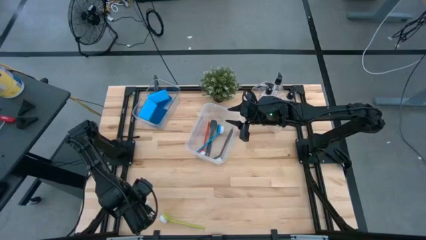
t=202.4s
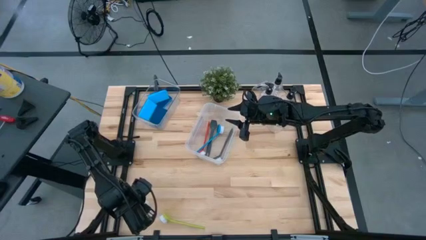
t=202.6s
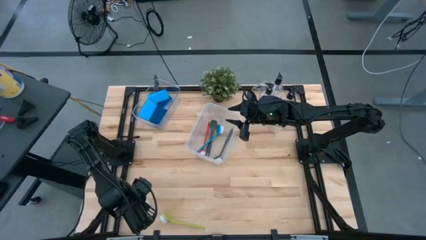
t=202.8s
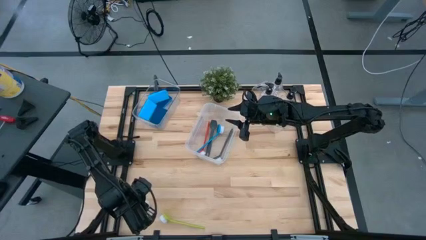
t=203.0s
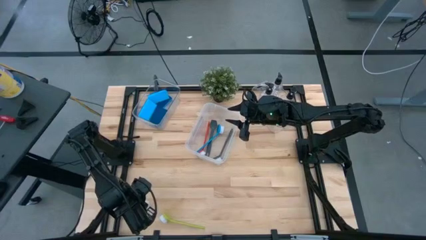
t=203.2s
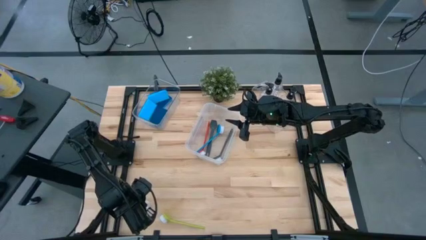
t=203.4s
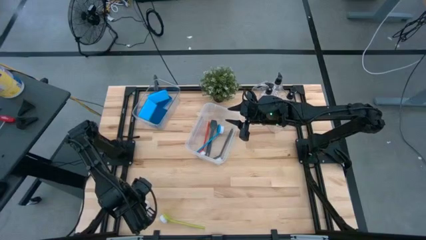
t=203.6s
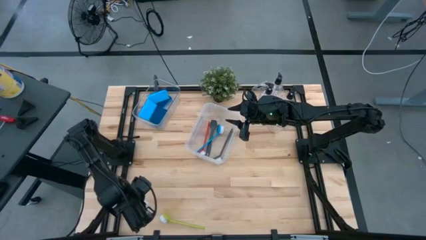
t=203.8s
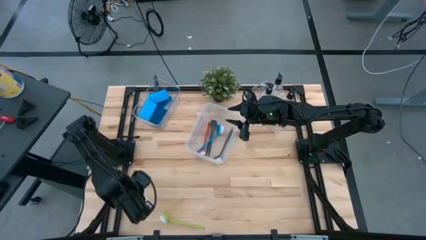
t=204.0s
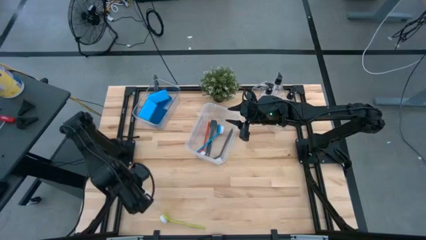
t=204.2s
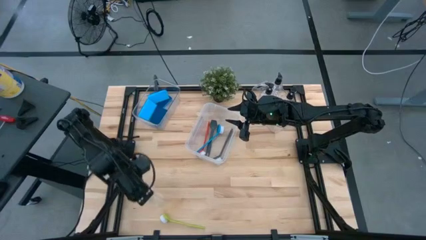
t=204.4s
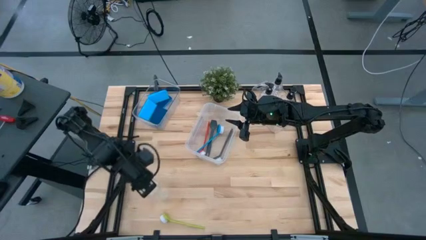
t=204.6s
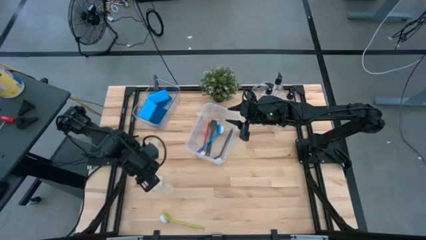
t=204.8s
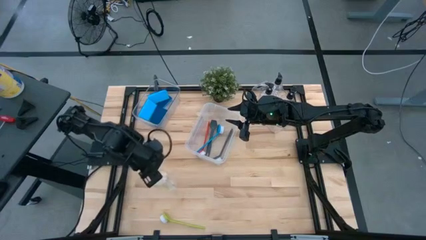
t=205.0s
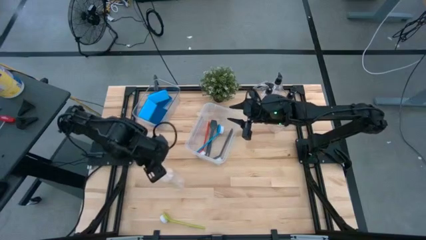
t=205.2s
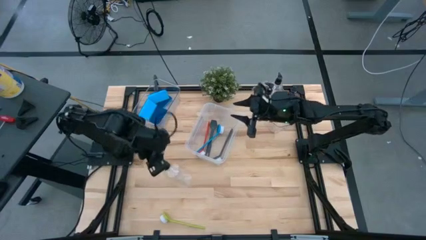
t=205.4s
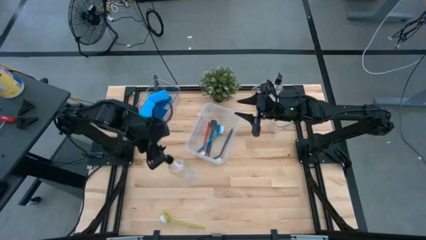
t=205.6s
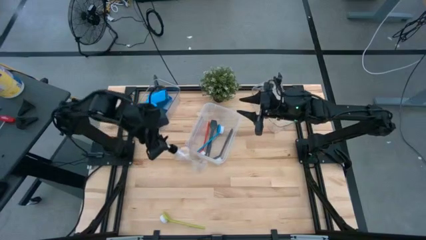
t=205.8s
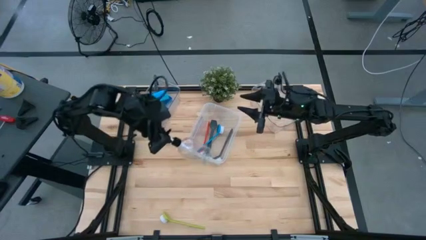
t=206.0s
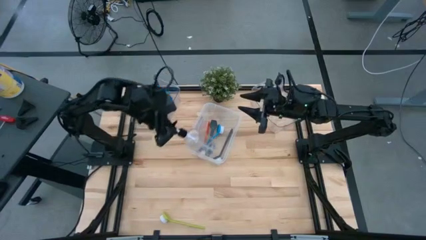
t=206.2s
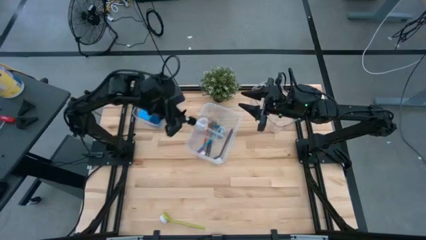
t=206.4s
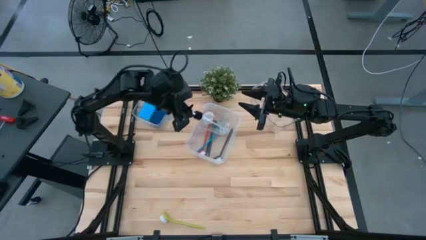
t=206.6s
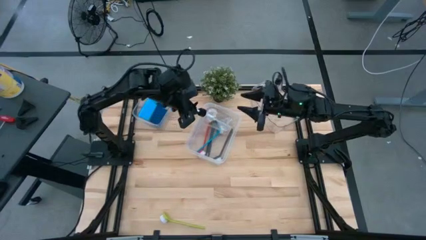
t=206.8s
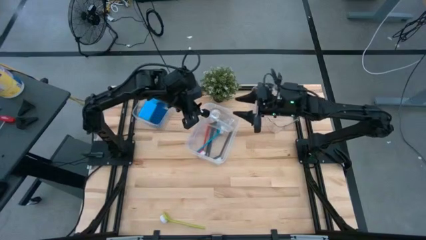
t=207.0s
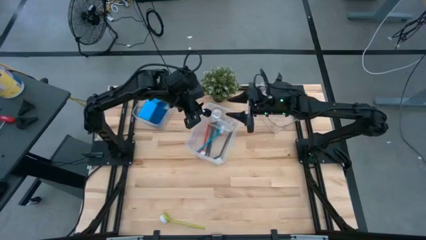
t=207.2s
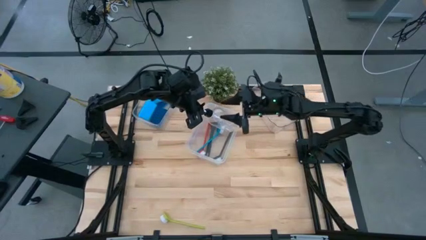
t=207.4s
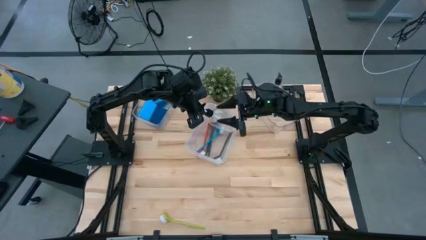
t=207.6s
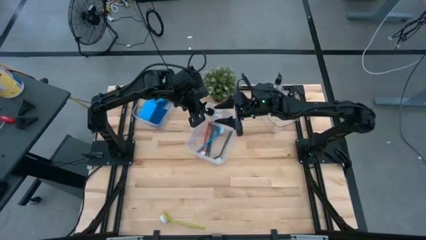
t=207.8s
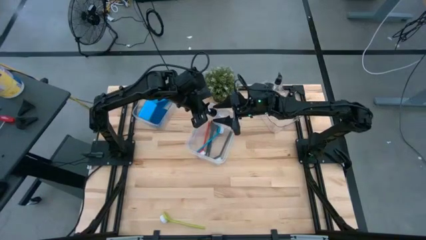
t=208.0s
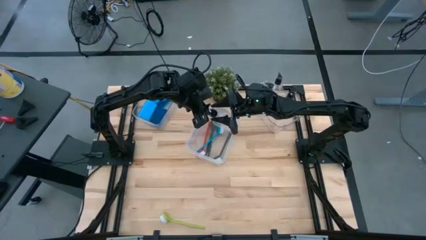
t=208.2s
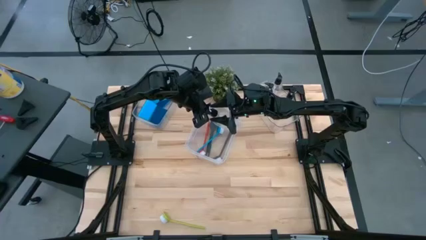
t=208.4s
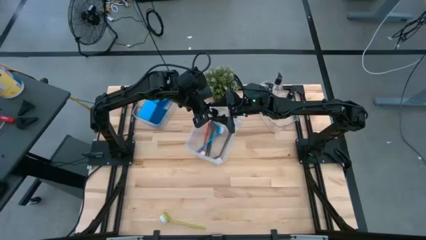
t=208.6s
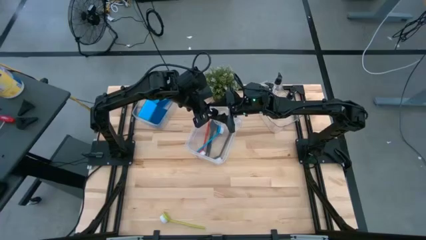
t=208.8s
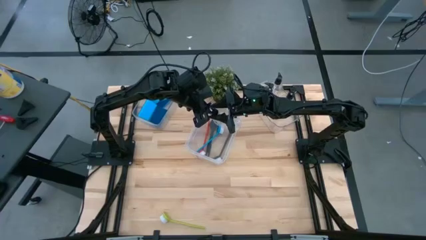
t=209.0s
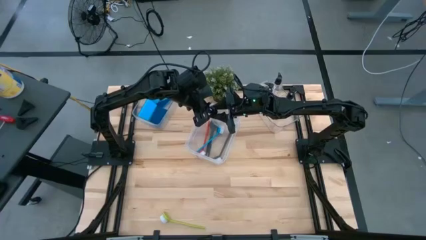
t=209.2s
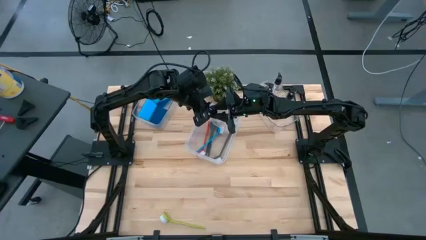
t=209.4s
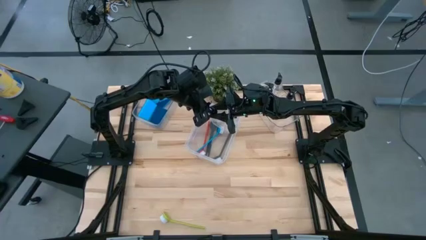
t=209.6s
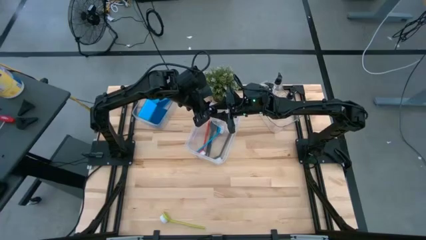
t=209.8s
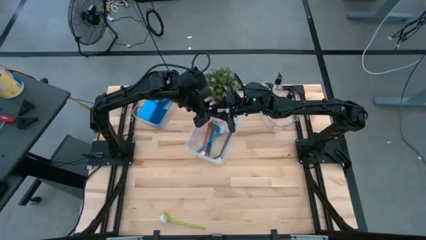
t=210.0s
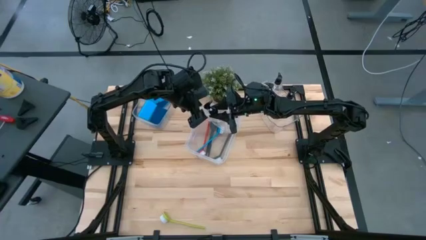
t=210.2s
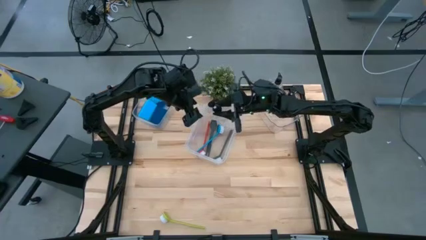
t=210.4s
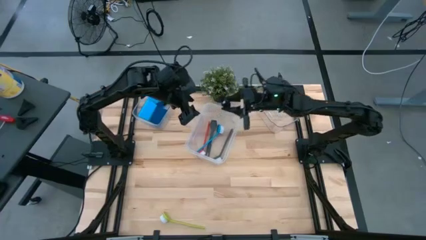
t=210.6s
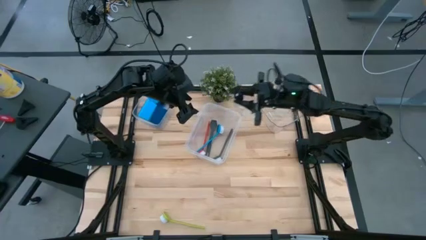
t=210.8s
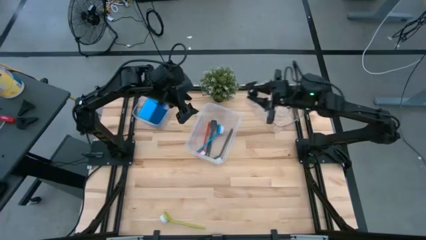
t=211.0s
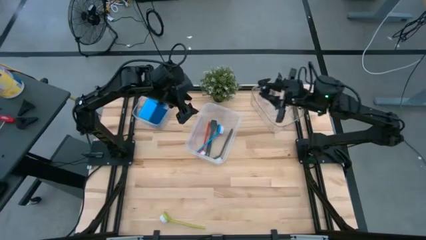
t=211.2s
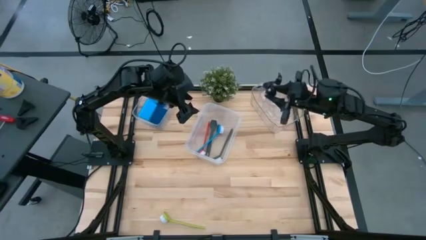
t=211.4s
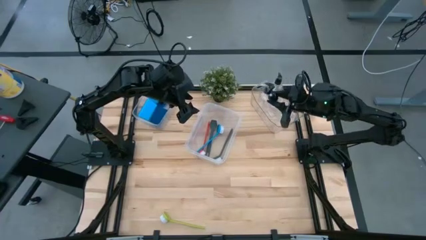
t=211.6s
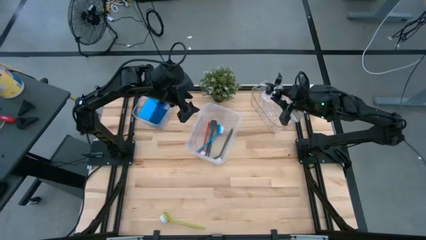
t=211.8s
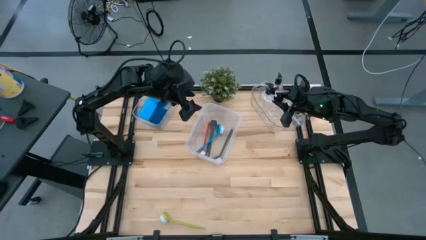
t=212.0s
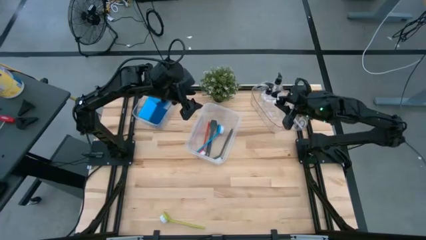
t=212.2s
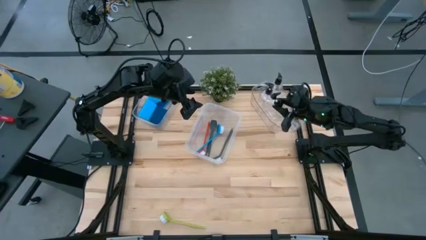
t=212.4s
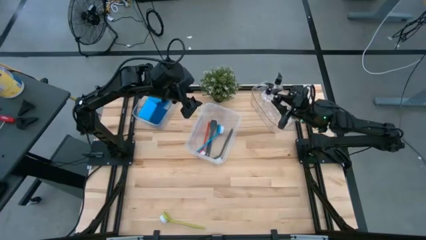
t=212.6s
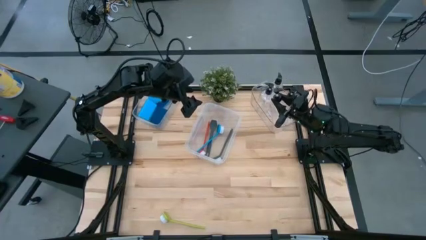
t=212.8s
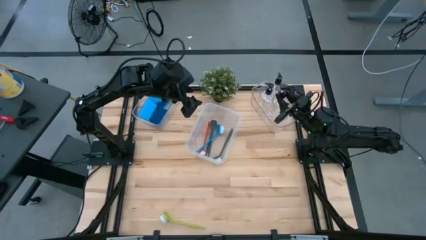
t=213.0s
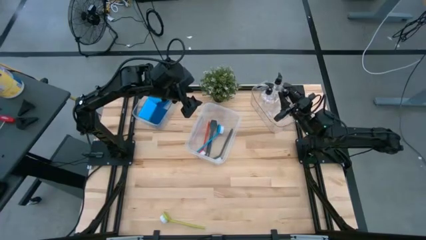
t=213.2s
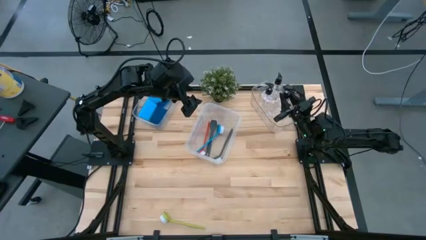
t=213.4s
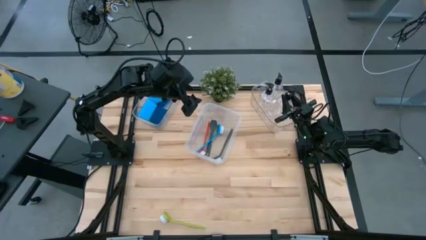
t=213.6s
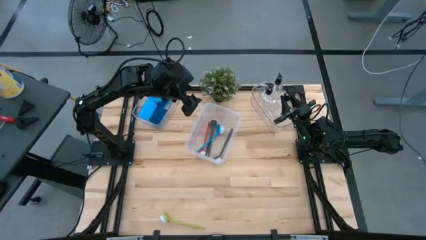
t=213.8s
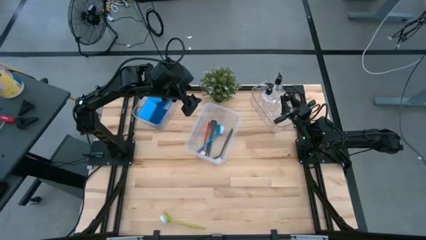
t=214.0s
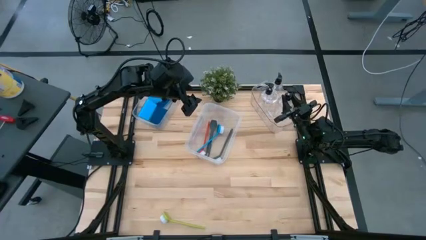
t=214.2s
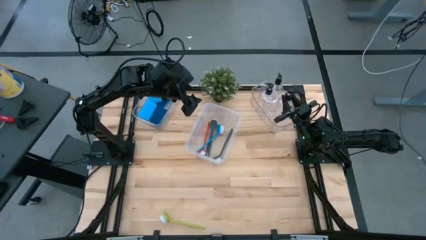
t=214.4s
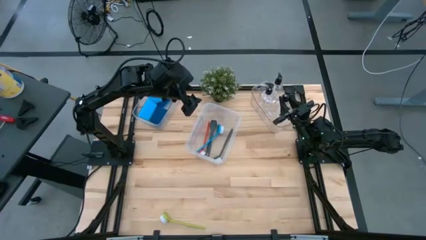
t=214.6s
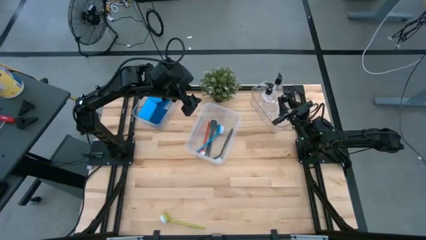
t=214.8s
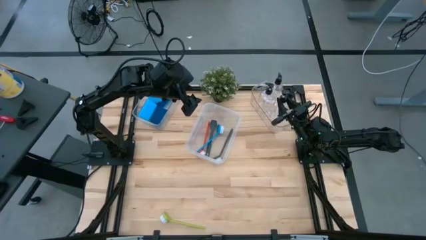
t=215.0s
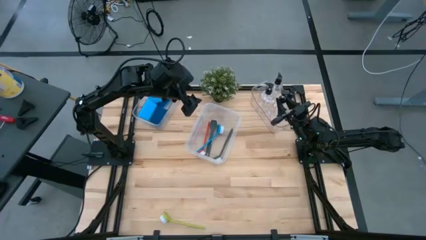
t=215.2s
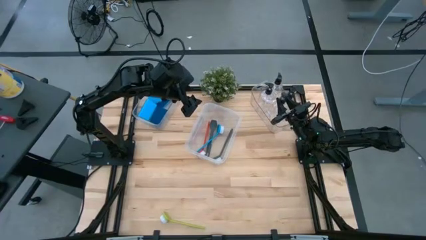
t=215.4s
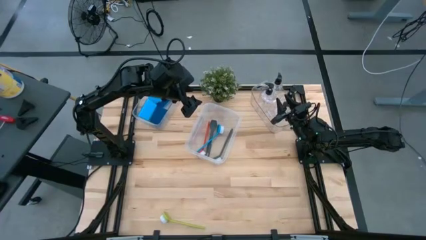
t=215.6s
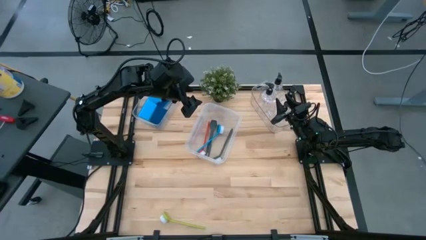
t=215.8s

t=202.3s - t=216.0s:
Task: Pick & Place Kitchen Sink Supplies
Put the black soap dispenser into the right transparent bin
